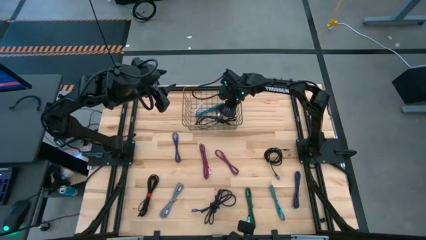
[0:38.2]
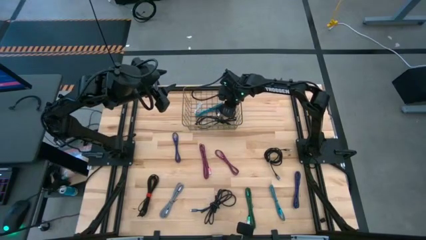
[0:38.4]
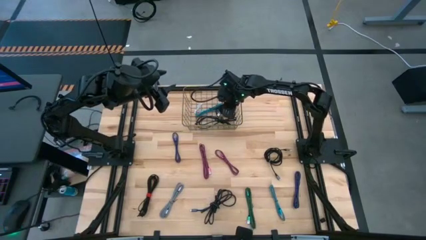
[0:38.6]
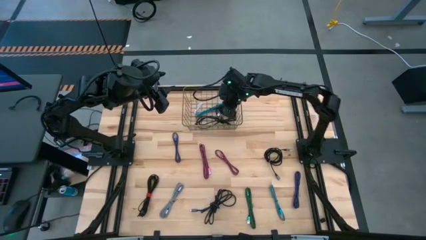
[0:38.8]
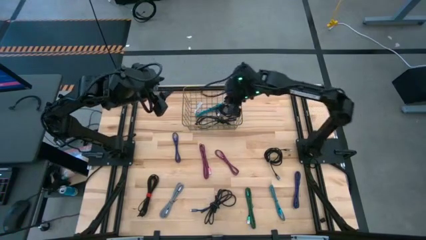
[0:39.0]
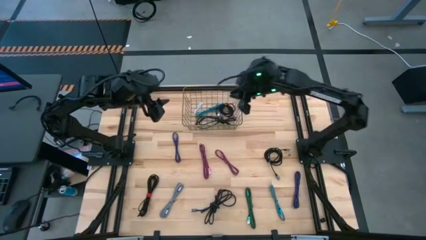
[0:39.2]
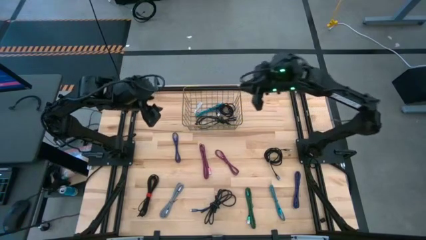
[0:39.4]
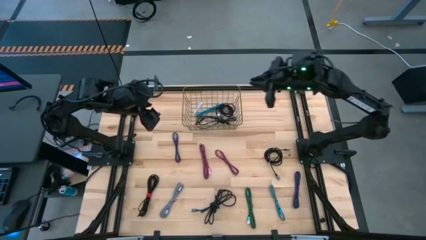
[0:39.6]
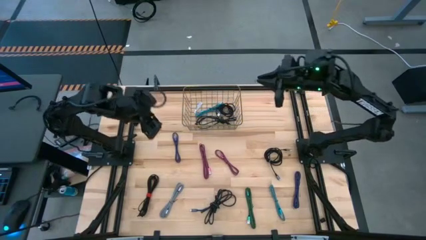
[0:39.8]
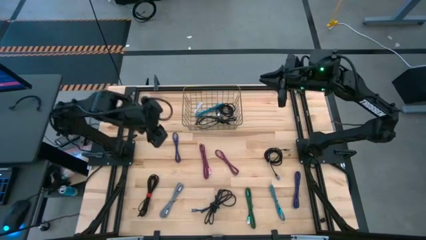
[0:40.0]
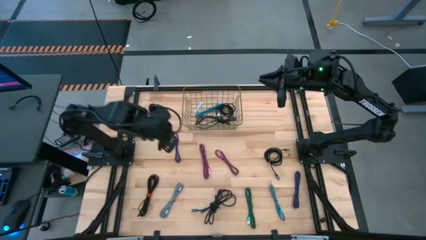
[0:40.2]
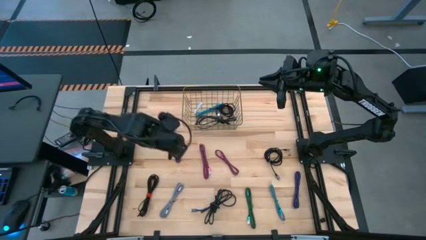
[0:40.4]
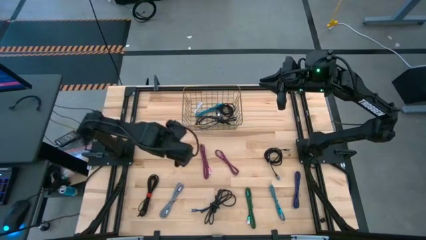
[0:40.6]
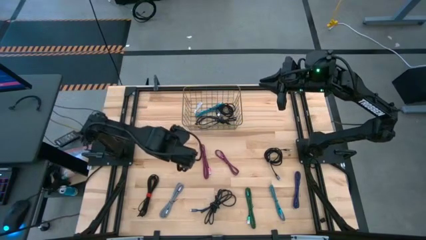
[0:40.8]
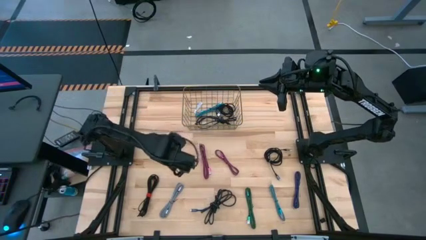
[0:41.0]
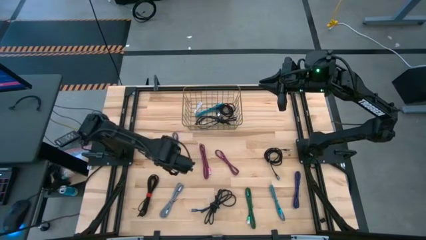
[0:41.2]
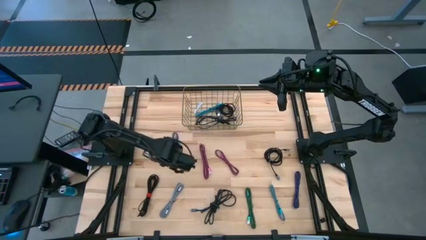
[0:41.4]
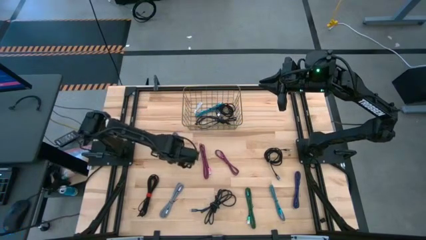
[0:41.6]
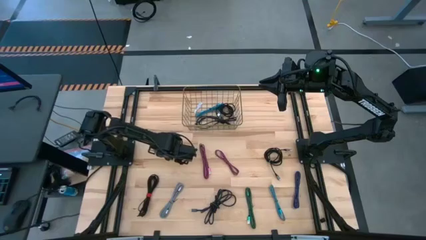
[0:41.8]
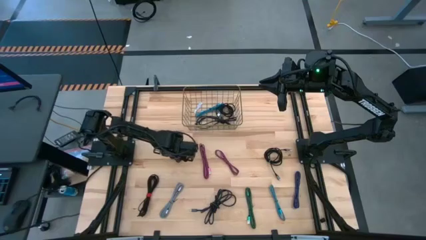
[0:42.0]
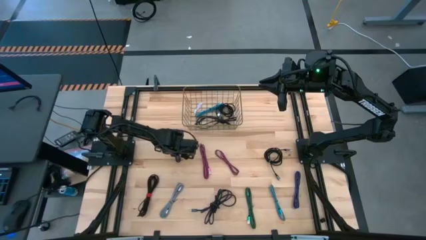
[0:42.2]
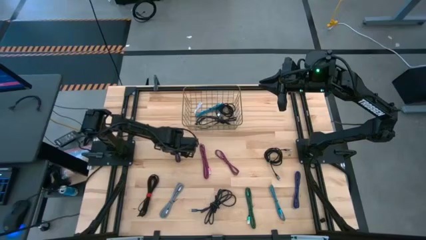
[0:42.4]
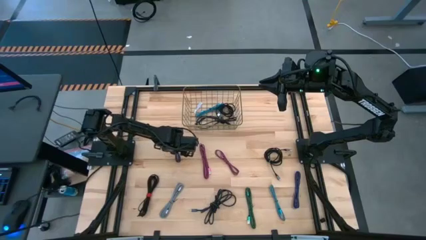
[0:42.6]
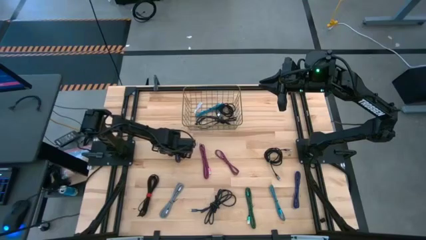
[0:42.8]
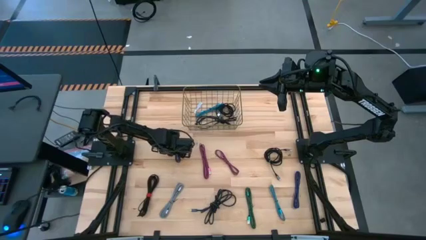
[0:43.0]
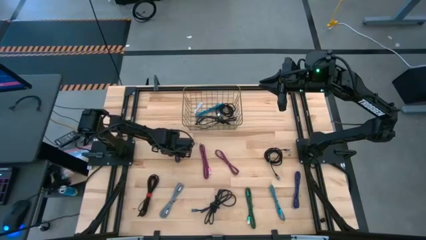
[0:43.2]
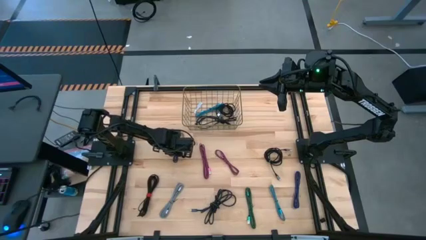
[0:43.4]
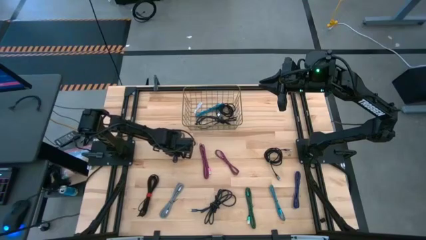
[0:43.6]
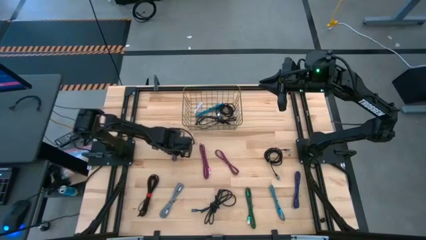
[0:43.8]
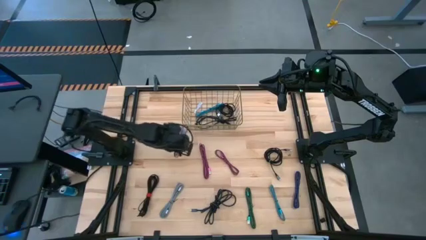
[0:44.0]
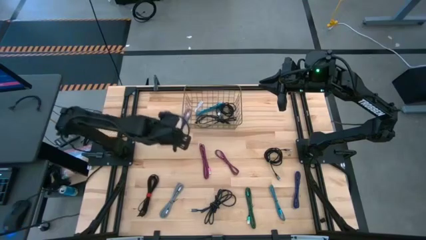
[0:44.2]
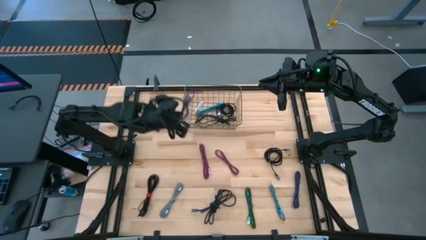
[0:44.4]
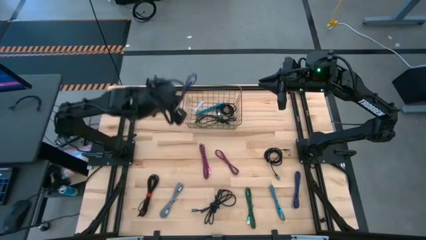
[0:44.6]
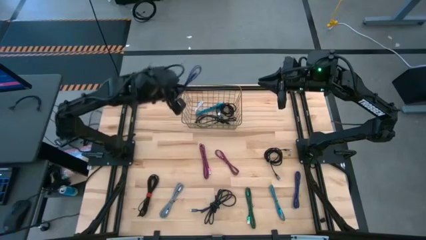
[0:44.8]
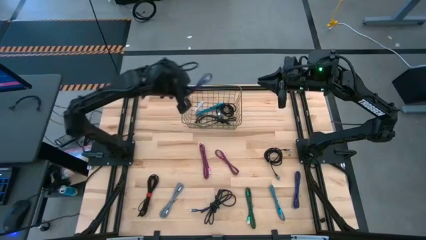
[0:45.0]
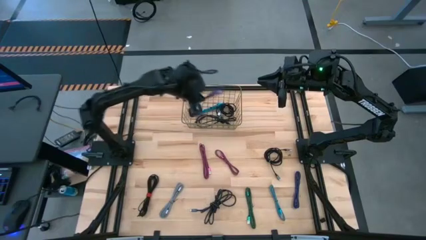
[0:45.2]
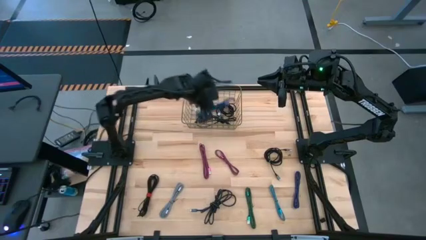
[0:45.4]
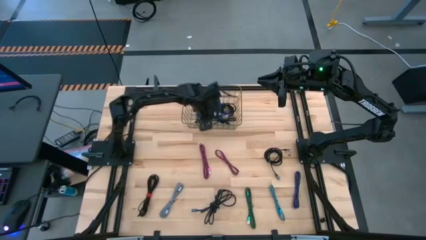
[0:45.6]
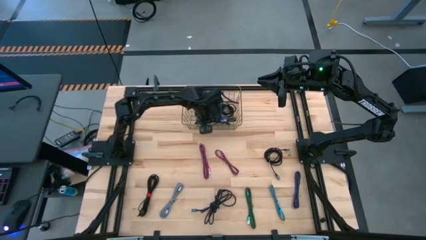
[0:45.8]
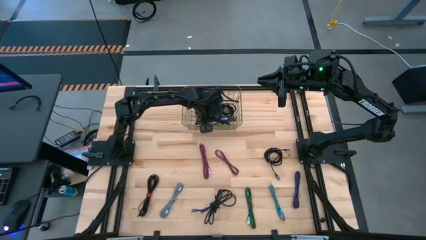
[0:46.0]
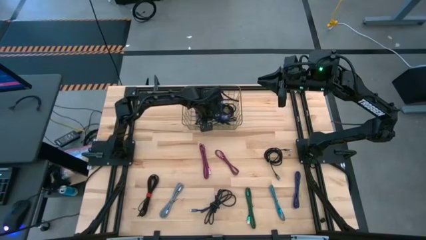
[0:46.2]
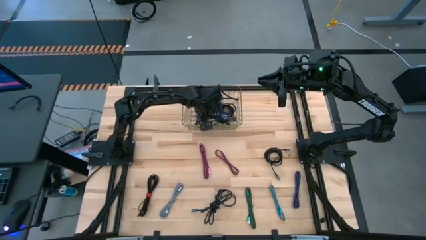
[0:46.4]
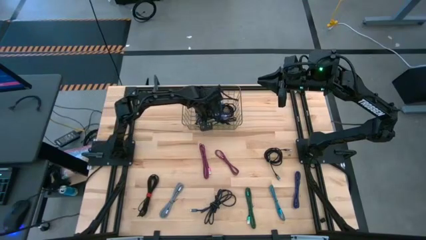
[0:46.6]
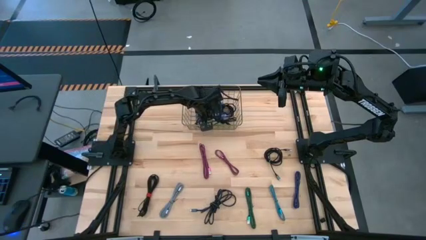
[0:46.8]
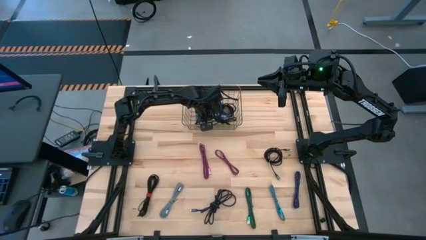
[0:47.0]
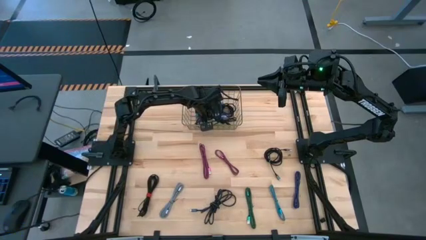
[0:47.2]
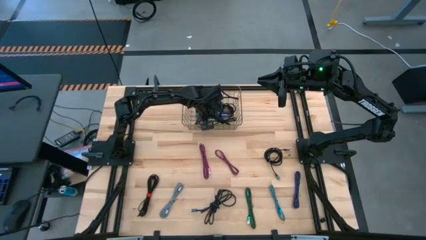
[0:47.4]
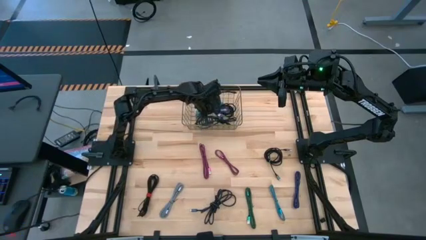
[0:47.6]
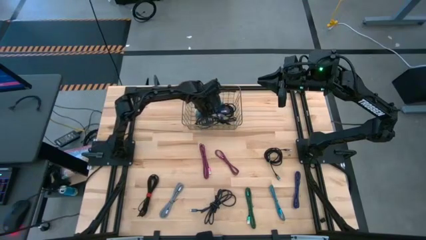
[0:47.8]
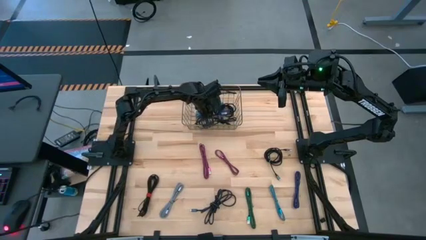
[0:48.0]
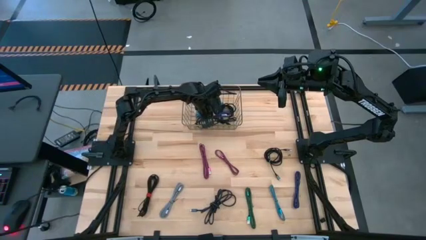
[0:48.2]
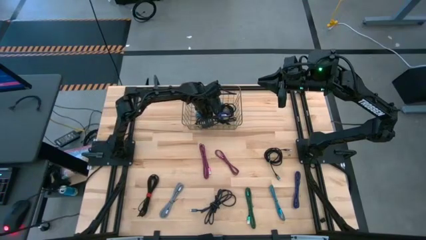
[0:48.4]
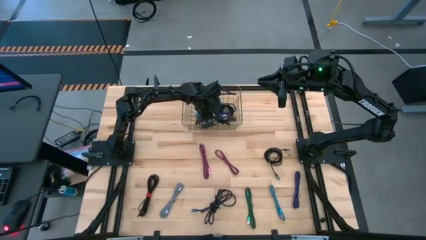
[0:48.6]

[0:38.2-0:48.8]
Task: Pick and place USB-C Cables
Put the dark blue charger cable into the wire basket

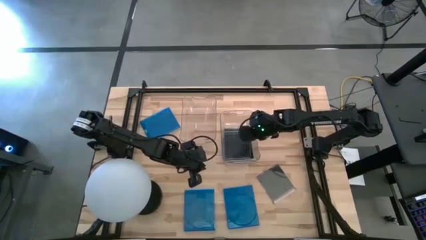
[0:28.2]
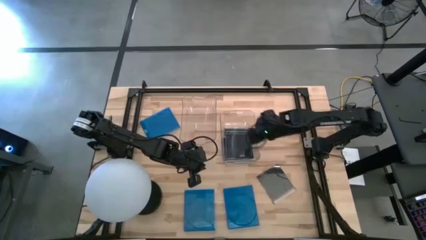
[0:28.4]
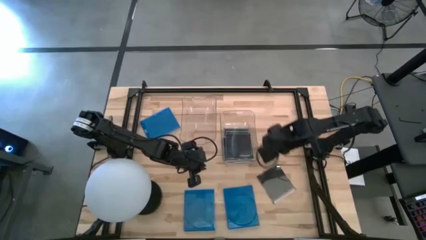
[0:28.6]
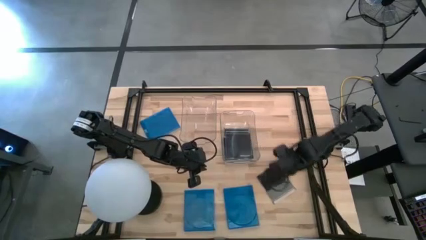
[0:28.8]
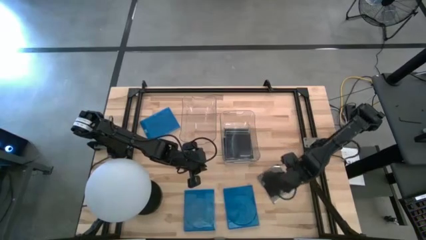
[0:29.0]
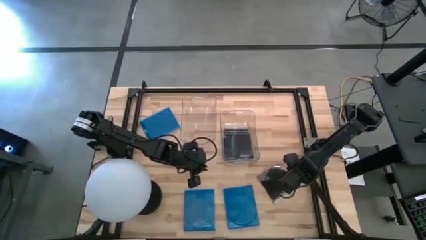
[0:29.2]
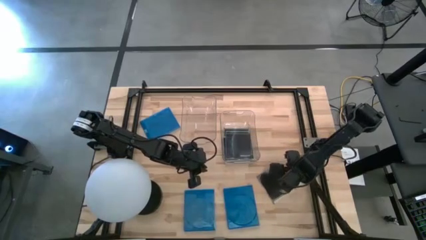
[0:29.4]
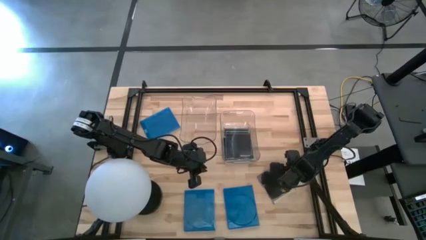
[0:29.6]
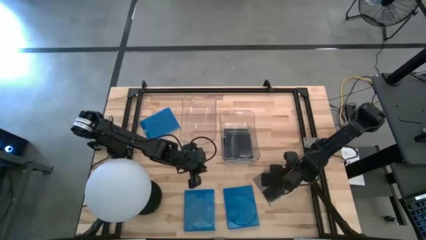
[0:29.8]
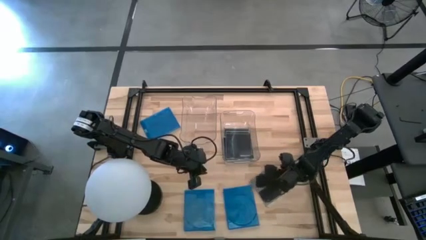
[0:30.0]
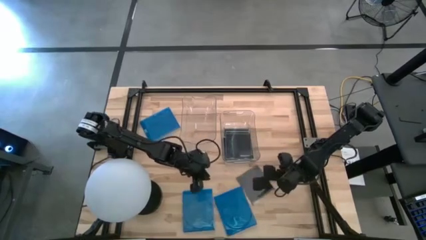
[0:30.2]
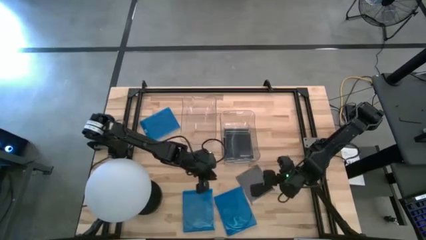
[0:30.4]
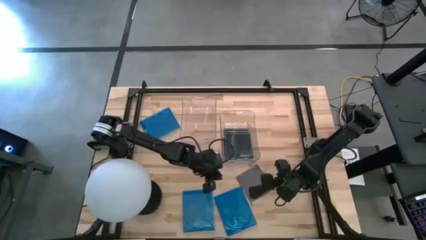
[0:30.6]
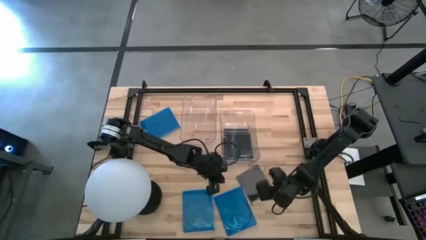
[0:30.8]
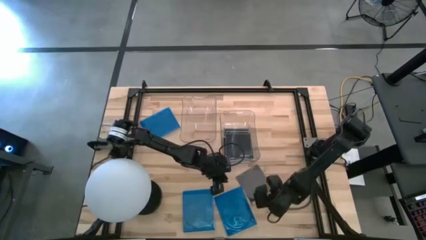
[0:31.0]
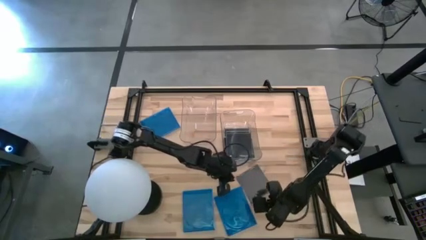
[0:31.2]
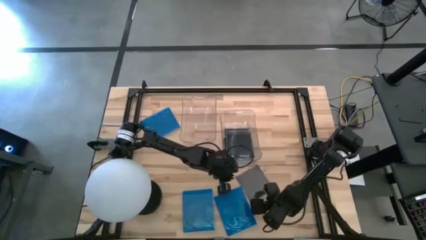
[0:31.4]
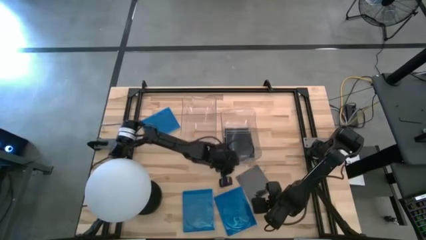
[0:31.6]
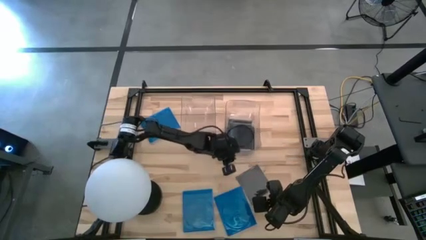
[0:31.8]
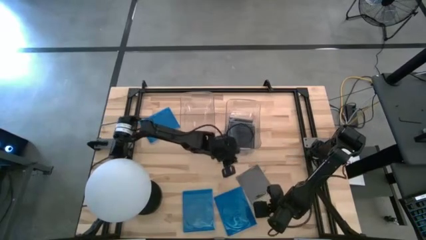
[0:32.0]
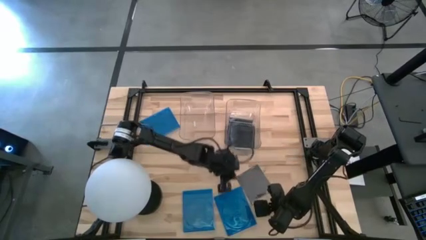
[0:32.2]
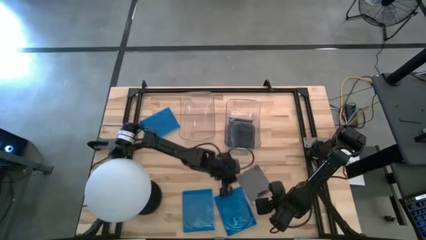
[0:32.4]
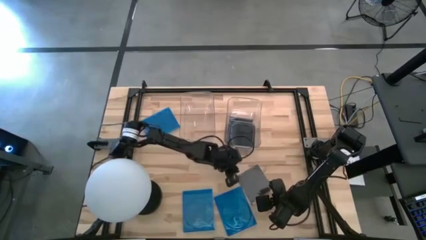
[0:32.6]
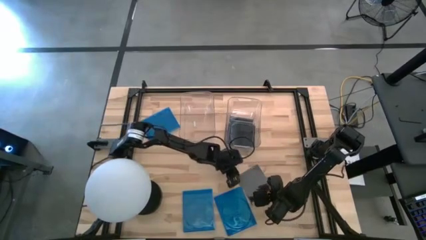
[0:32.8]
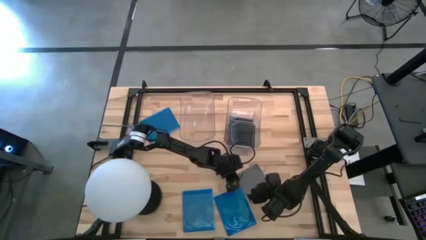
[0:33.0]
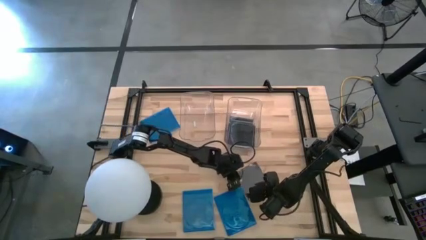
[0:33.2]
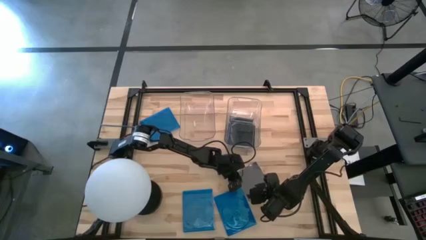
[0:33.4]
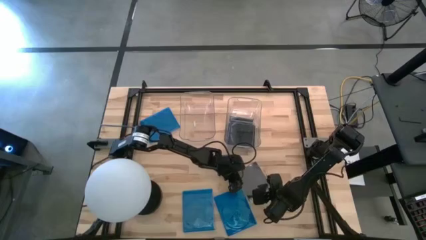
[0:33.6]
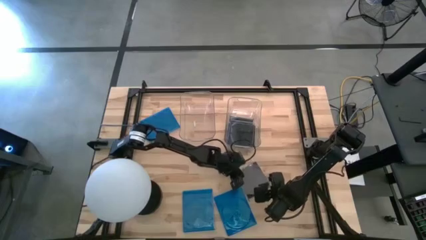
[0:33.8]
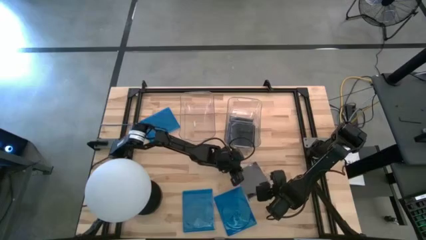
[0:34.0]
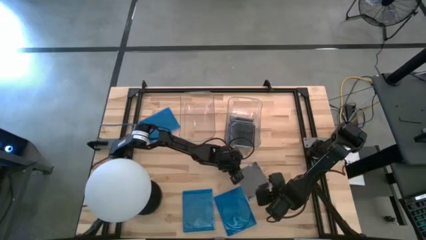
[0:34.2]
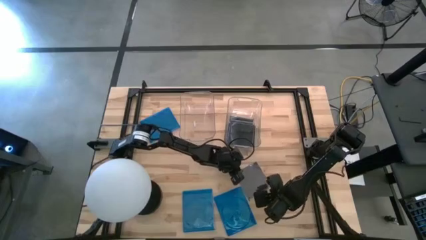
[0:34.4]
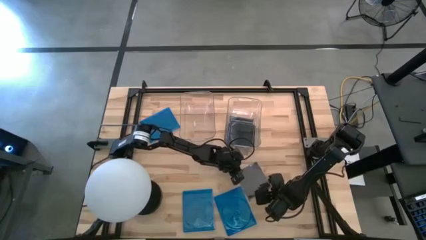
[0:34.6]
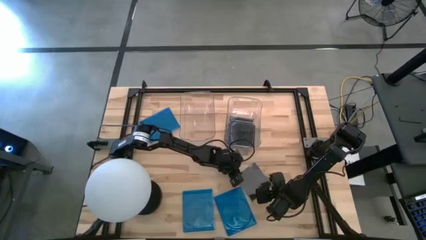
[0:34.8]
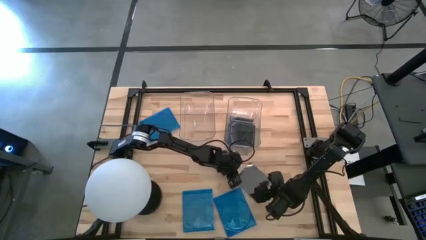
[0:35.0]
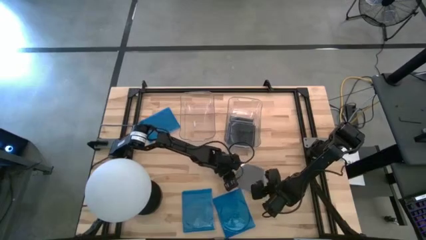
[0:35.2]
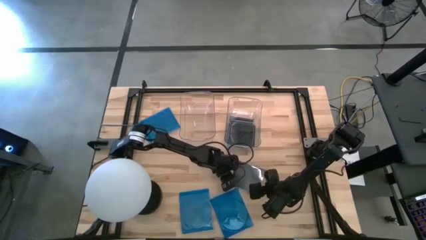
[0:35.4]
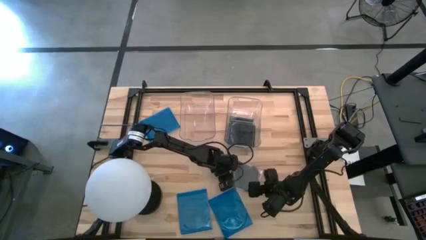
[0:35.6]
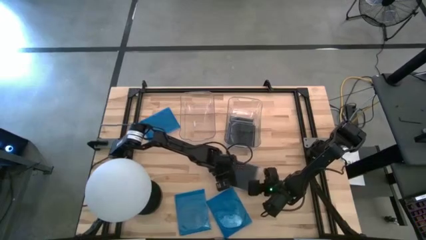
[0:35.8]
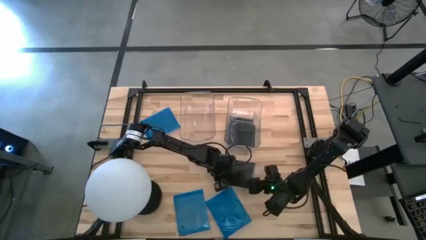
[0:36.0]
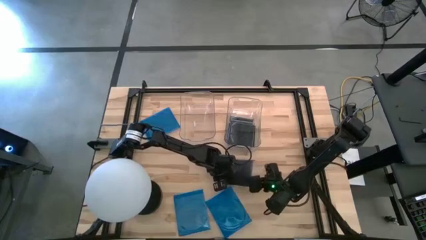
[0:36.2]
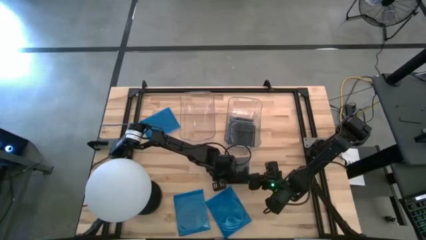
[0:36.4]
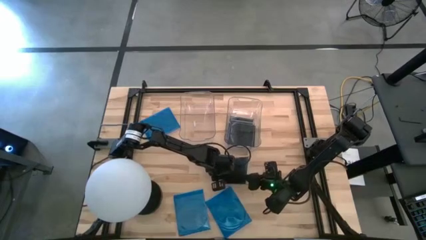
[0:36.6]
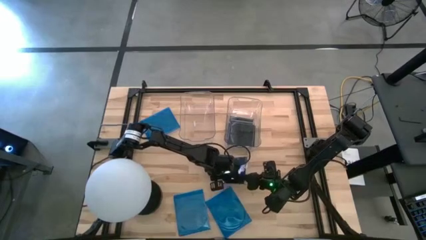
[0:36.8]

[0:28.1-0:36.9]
Task: Pick & place jewel cases by type
Put the black CD case into the right transparent bin
